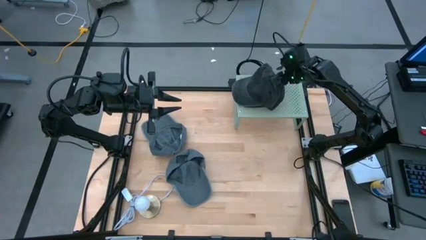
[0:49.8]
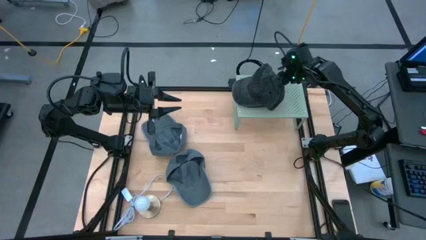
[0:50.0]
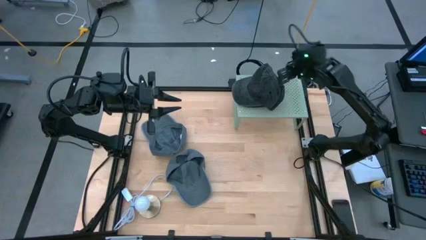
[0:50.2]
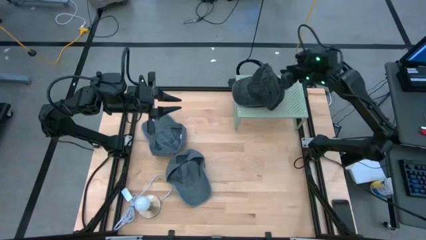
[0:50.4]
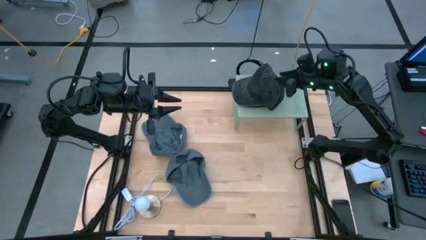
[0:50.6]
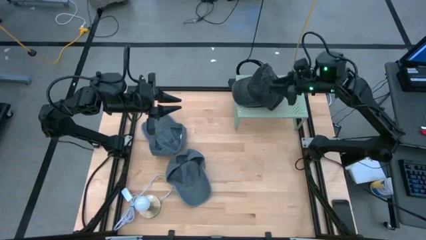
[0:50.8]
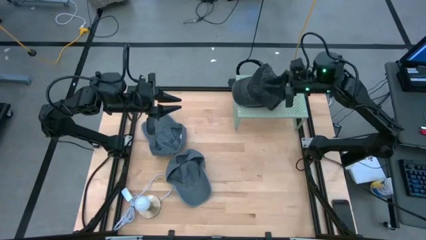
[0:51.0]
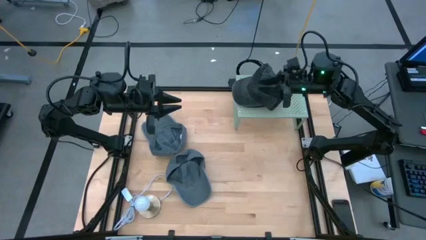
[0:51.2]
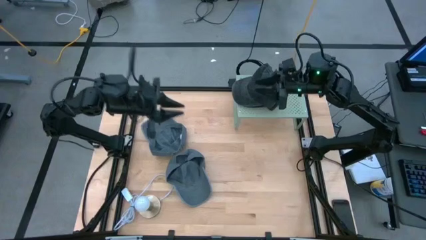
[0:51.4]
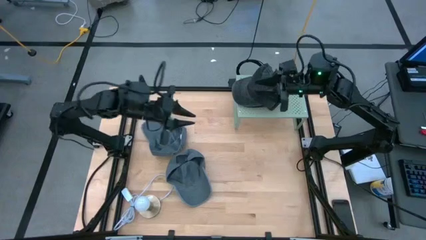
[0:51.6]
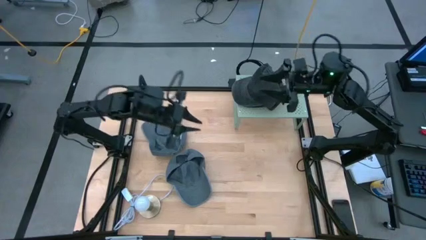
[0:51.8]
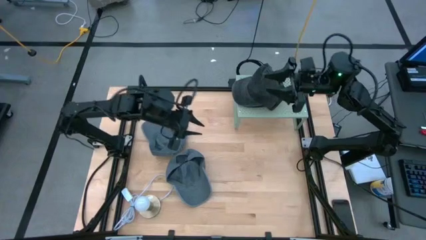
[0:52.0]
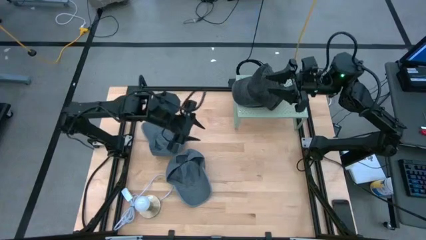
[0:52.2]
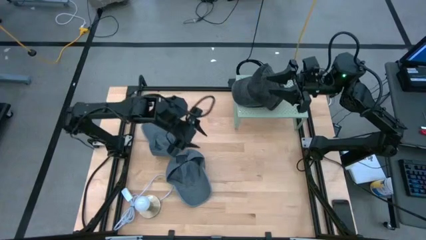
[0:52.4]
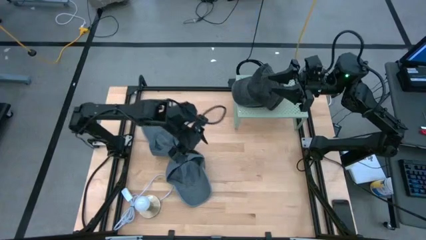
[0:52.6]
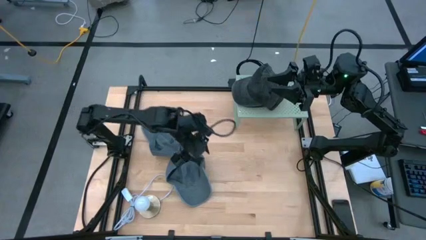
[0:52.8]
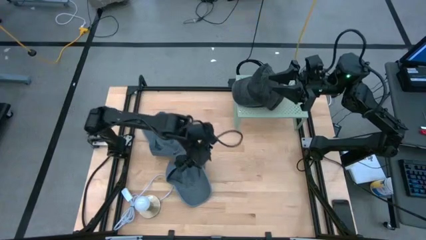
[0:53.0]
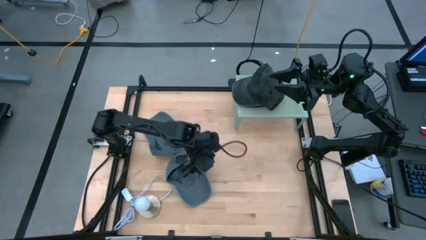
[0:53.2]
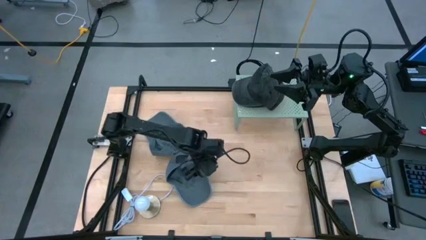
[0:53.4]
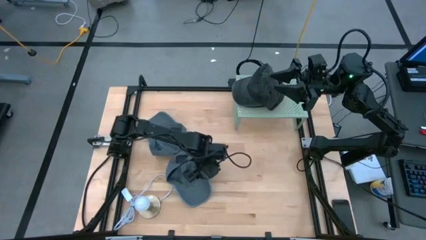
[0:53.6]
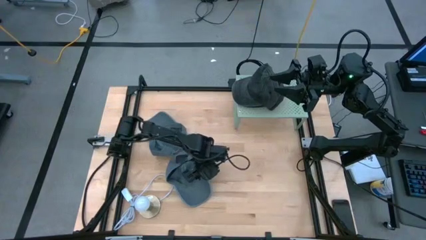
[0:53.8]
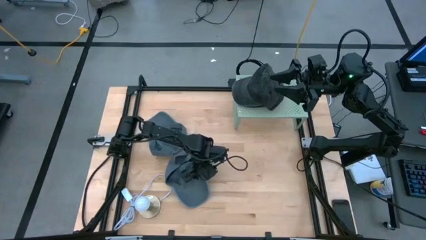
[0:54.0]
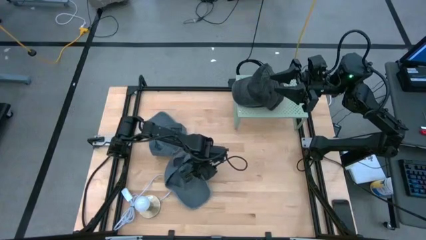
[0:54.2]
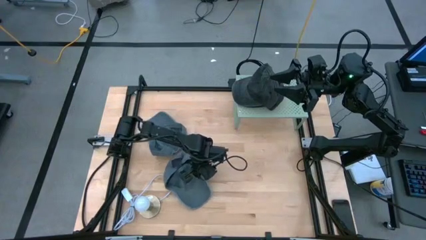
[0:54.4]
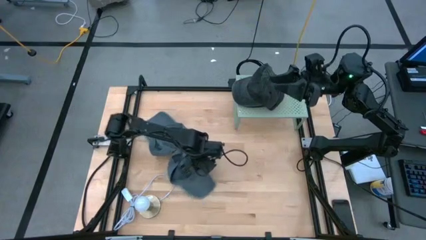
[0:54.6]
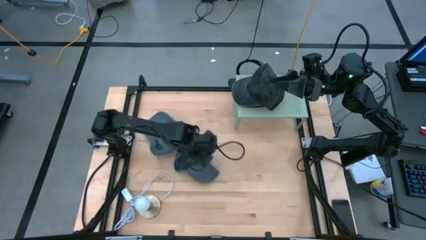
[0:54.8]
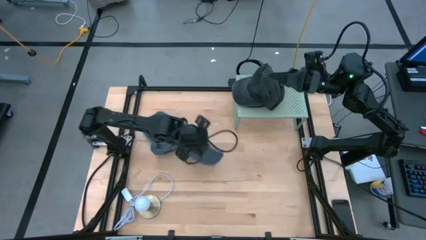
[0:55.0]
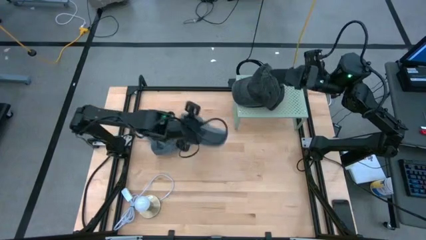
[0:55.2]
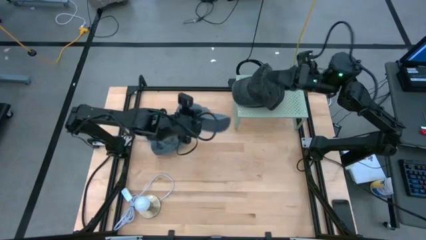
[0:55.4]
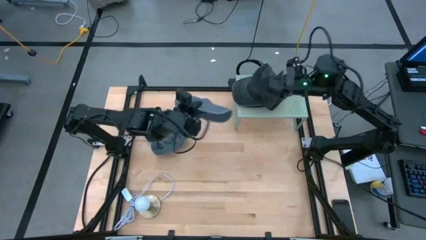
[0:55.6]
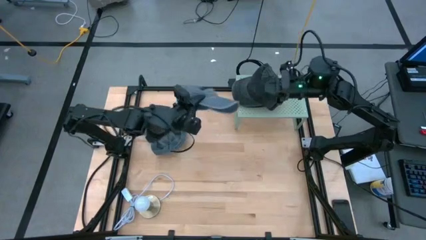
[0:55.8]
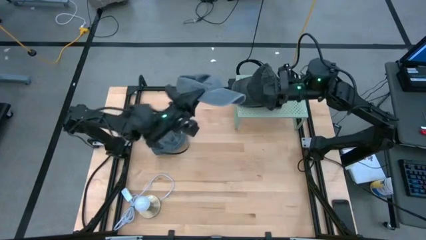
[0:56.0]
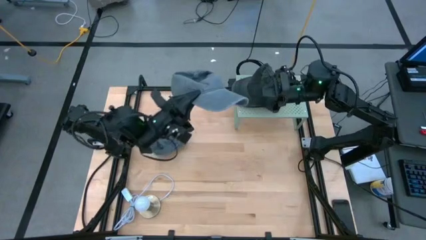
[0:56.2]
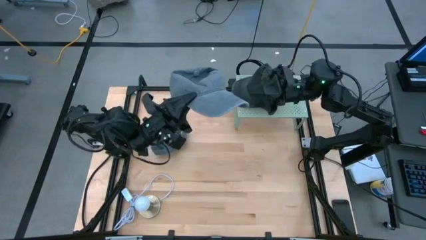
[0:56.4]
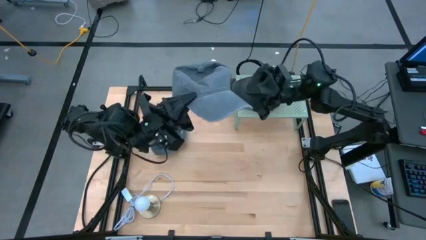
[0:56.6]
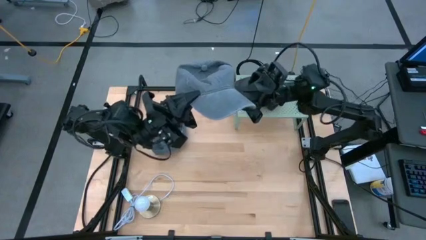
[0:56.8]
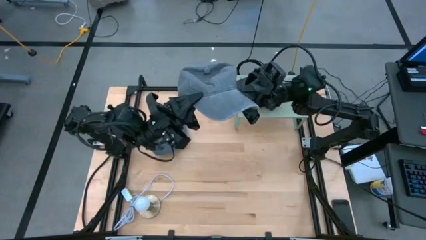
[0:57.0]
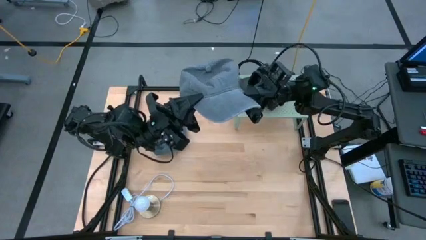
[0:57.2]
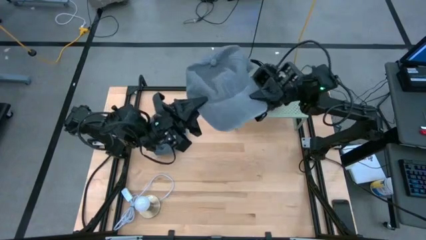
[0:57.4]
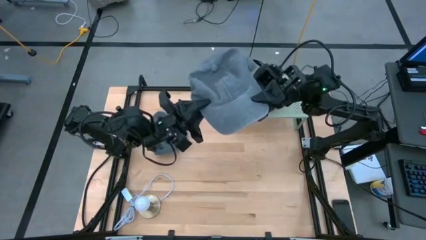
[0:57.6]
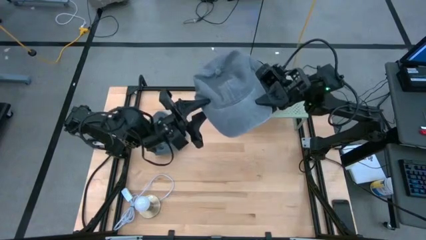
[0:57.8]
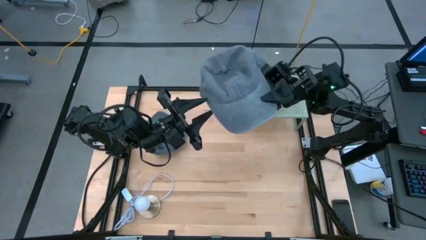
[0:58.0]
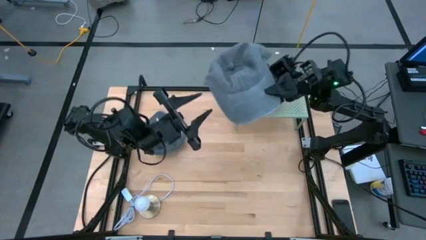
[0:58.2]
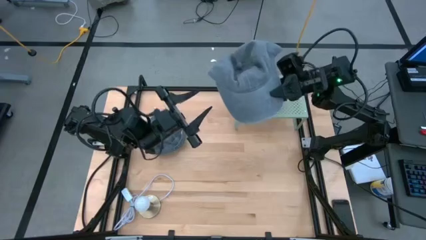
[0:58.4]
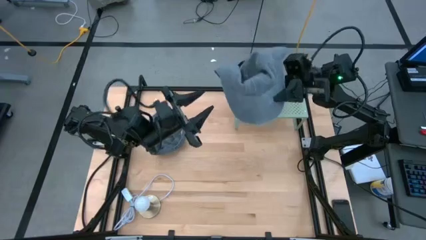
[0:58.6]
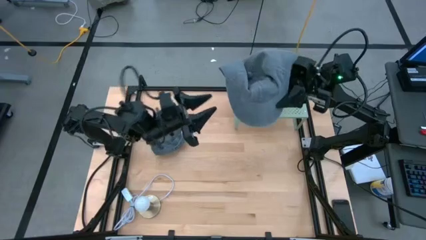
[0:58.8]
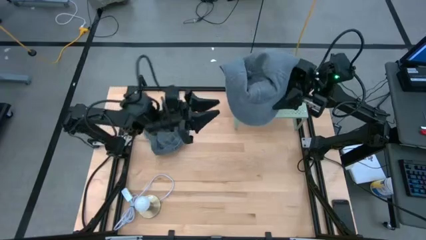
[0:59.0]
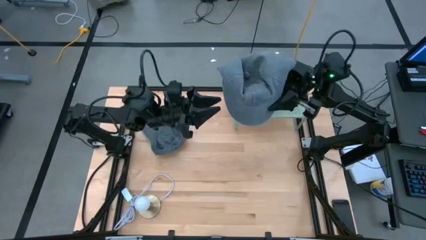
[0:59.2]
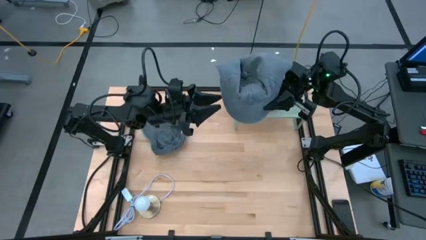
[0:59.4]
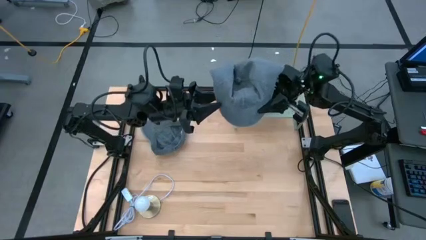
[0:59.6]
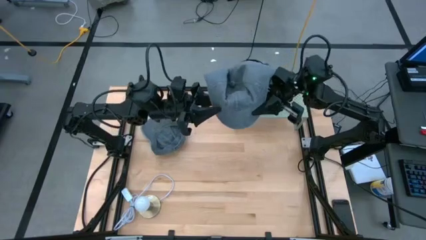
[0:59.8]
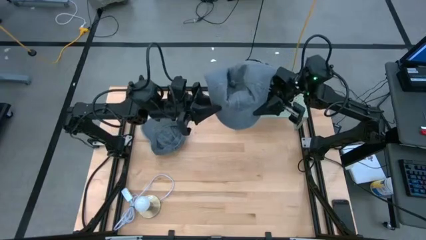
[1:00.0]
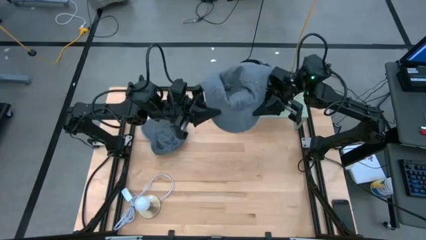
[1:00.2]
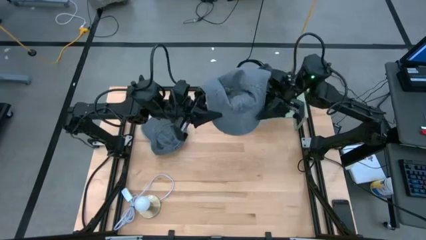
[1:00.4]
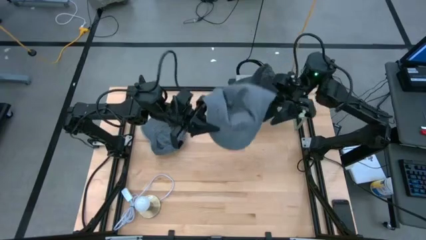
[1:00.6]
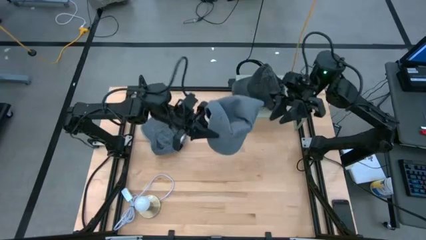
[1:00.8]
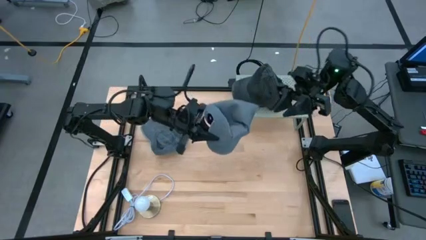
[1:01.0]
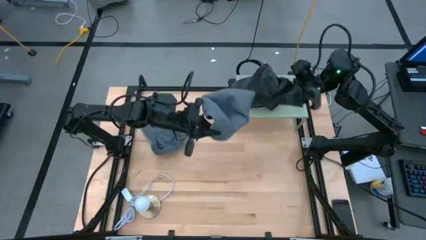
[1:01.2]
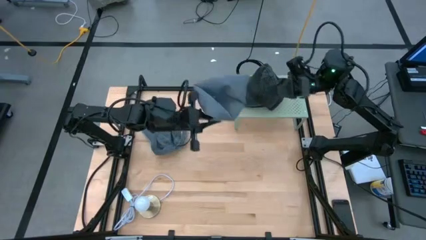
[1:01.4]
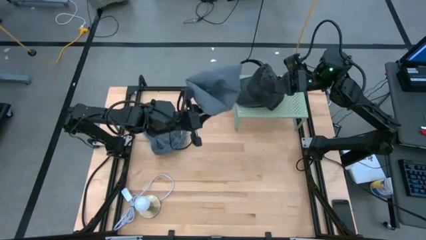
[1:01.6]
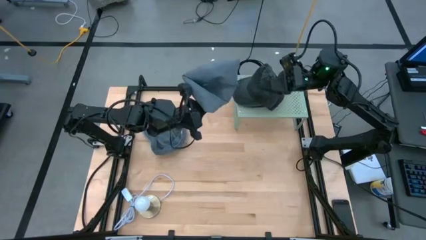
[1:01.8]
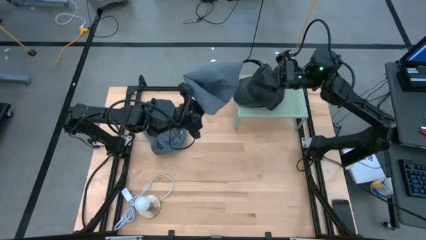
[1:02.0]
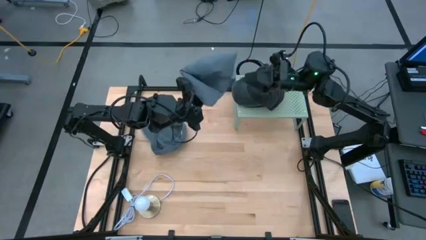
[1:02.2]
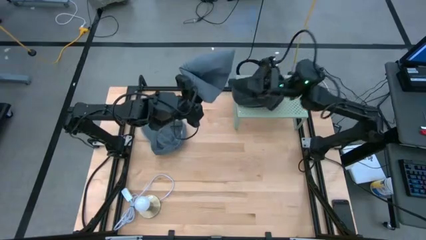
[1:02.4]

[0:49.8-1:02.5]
Task: Pick & Place hat
Put the bottom gray cap on the shelf
